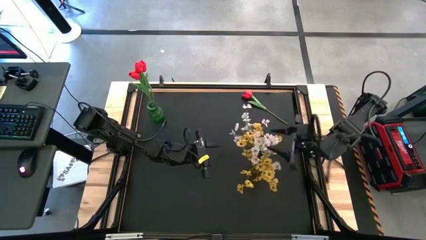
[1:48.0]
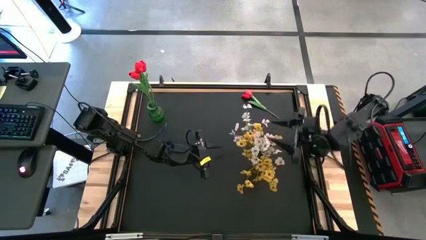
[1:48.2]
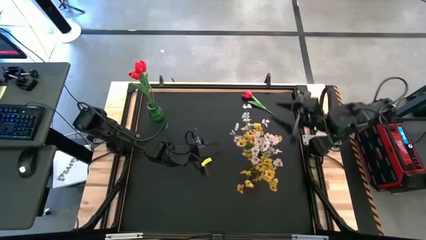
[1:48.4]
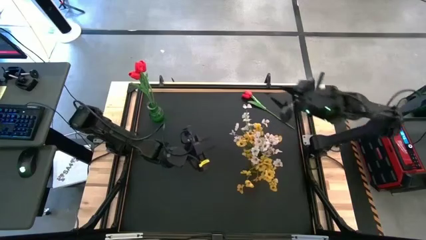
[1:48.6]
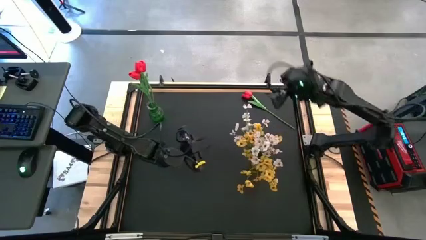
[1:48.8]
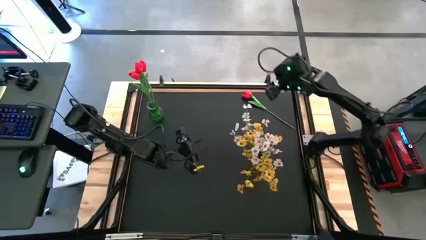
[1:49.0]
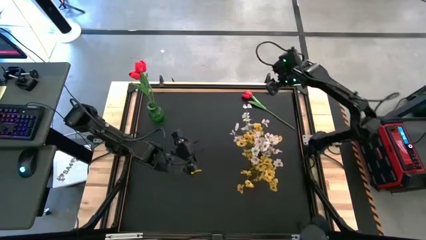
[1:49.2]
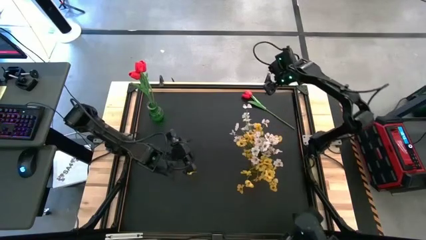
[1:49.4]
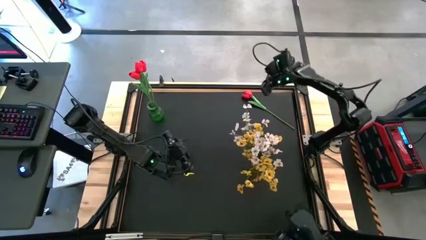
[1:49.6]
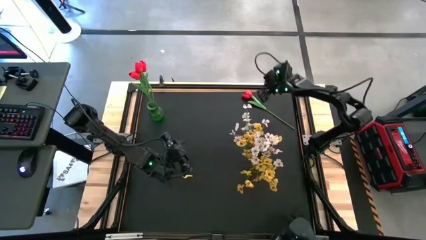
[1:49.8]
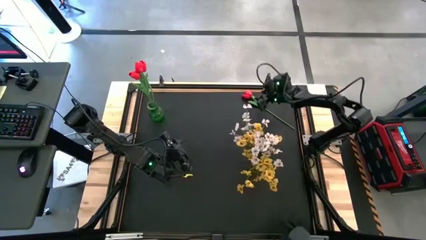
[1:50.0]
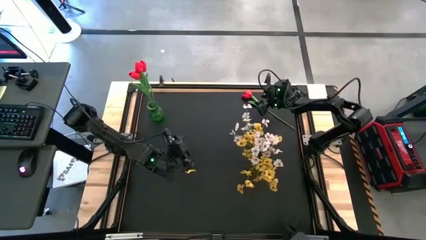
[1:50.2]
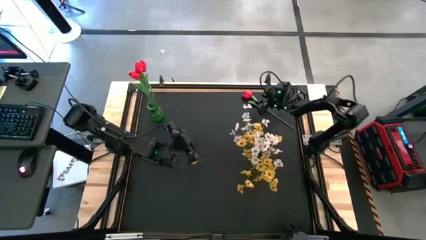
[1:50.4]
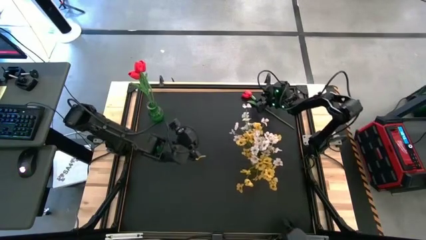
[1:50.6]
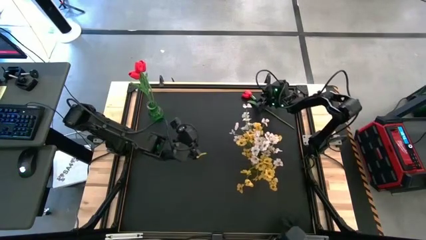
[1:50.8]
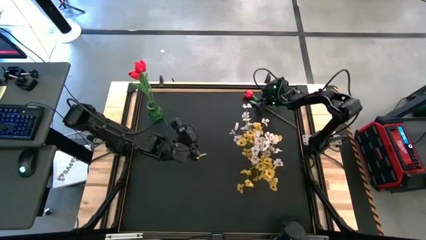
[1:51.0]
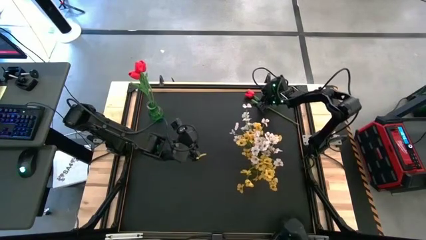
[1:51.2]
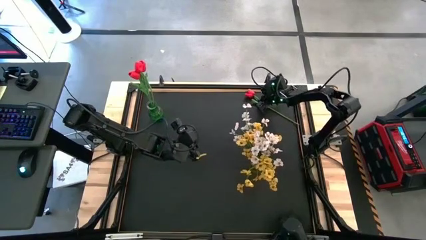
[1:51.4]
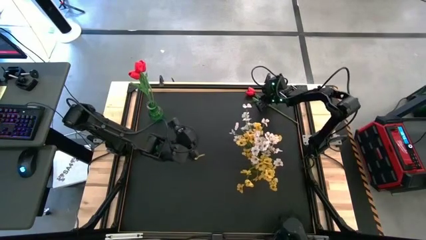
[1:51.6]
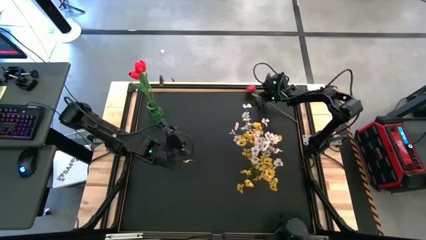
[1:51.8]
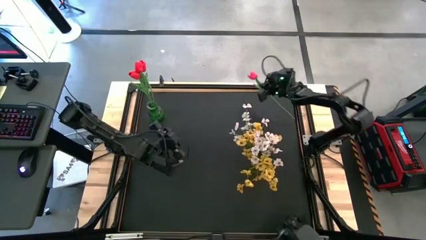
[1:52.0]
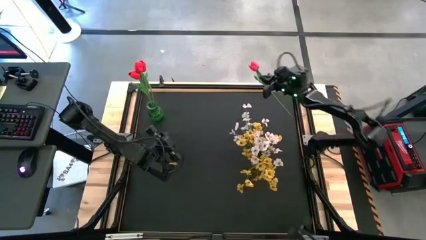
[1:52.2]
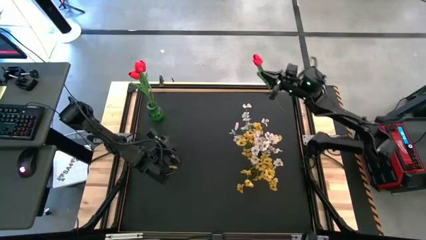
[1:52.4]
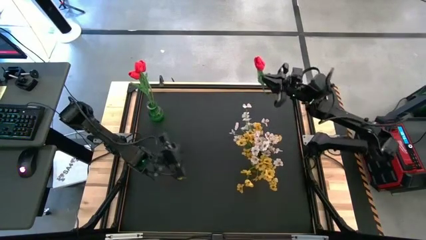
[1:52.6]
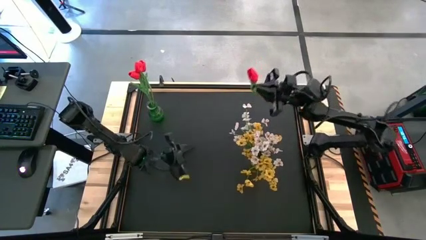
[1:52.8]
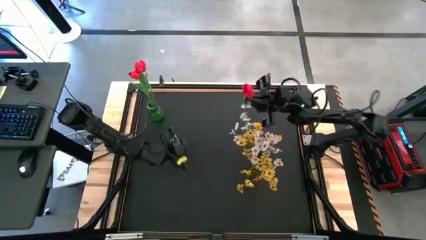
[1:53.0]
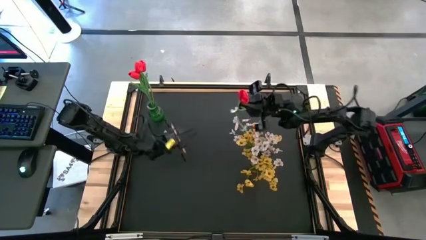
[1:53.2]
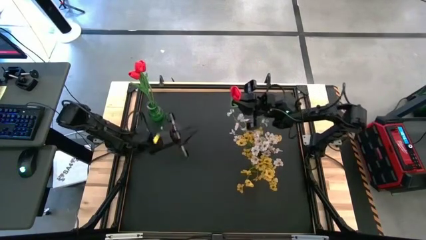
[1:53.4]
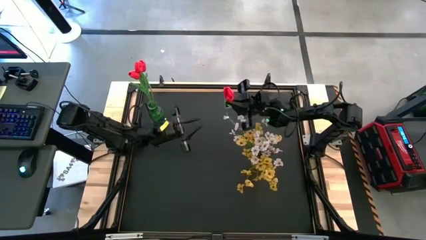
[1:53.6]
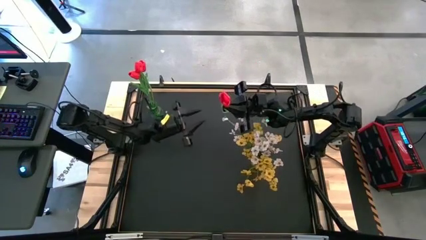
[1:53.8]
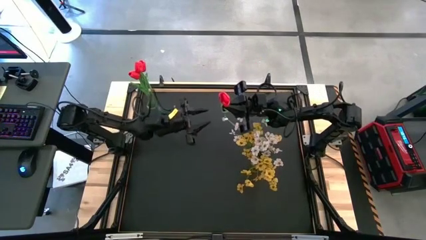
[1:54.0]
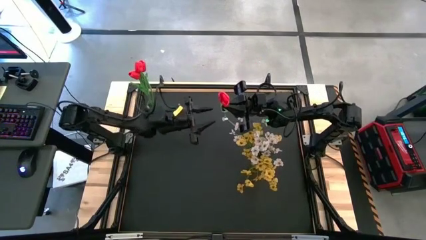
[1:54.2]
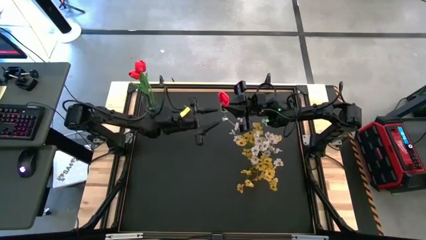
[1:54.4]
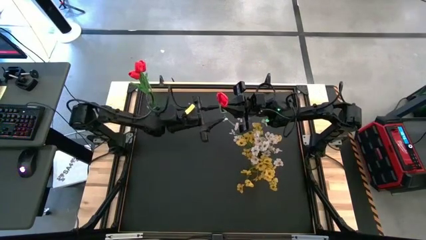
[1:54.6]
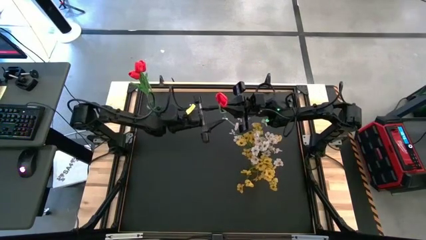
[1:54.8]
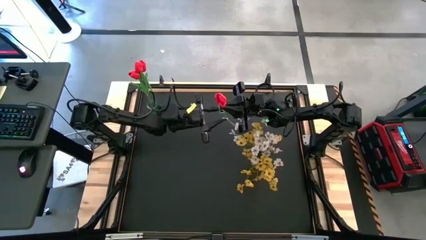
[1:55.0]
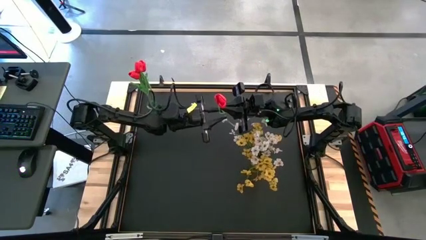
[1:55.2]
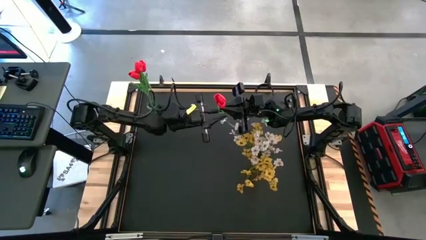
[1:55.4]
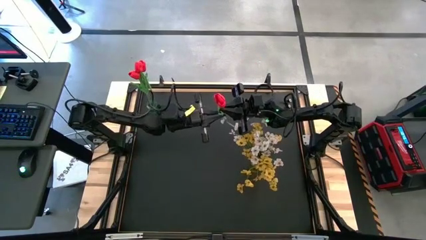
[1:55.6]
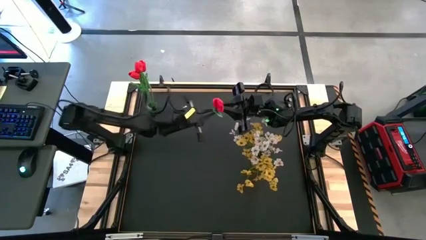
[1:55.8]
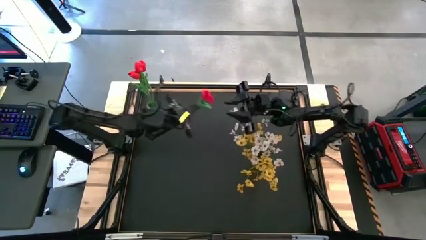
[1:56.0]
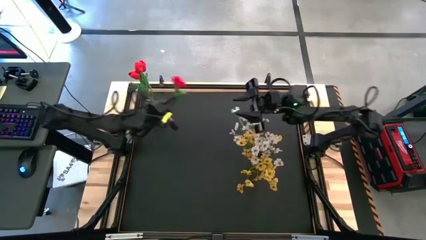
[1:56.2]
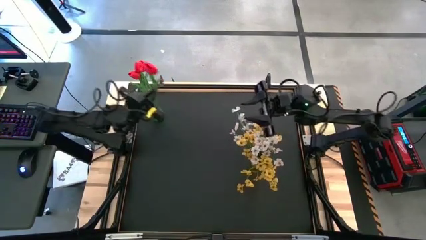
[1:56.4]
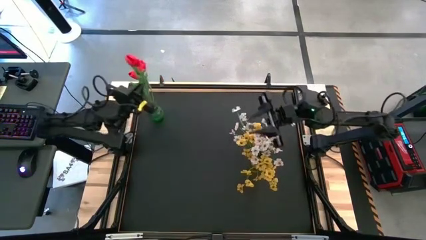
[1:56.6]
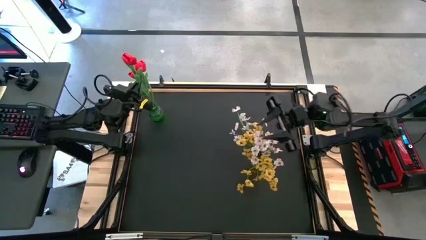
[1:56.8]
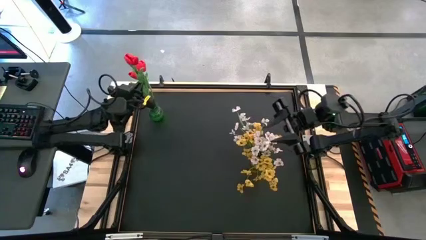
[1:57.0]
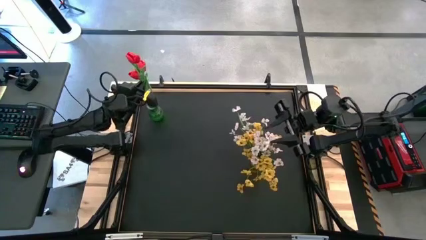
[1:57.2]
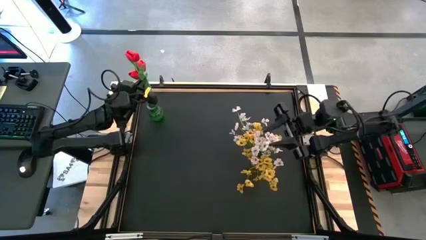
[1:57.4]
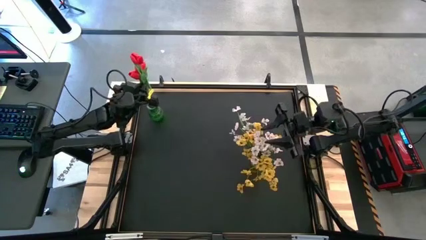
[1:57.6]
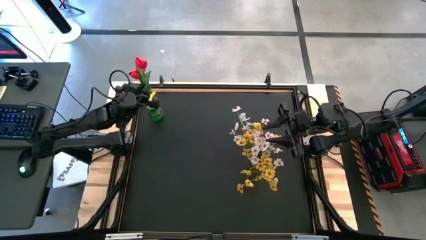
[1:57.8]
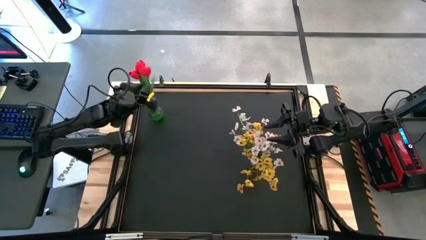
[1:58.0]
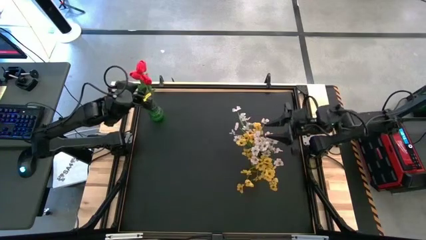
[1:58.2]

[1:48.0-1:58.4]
Task: Sort flowers into vase by color
Put the red flower into the green vase

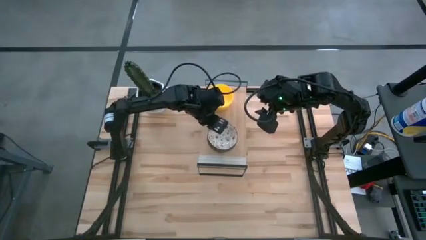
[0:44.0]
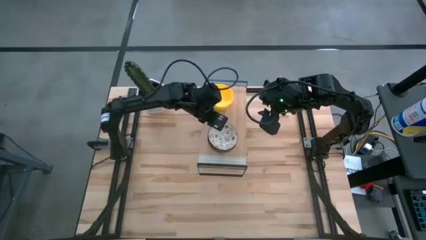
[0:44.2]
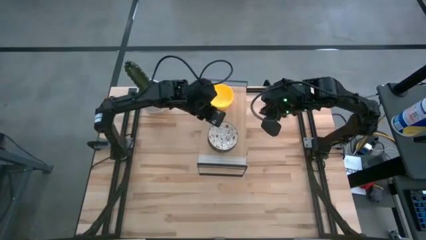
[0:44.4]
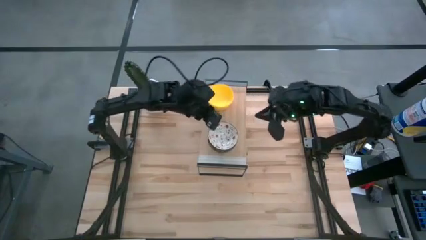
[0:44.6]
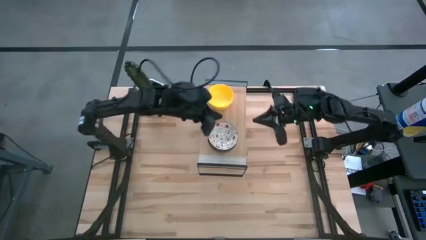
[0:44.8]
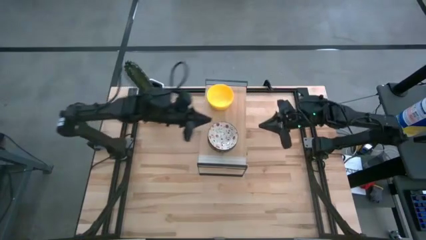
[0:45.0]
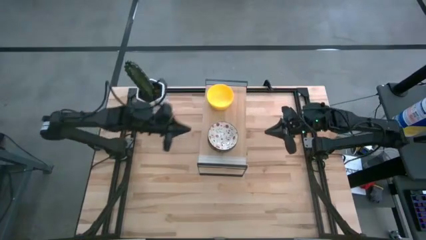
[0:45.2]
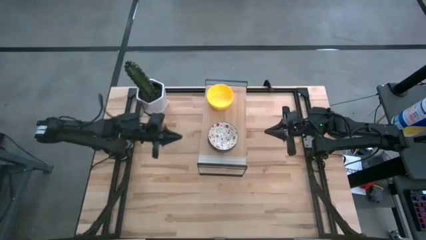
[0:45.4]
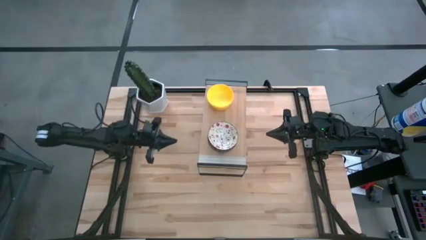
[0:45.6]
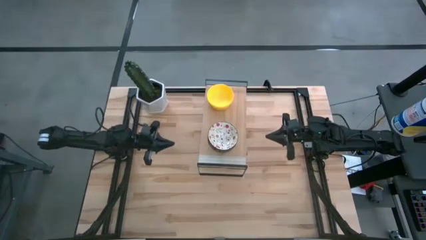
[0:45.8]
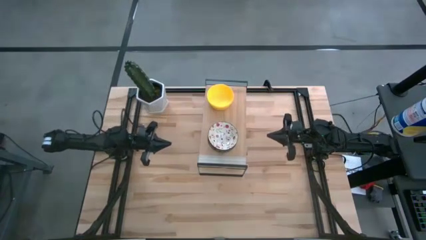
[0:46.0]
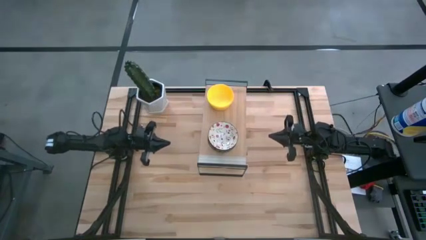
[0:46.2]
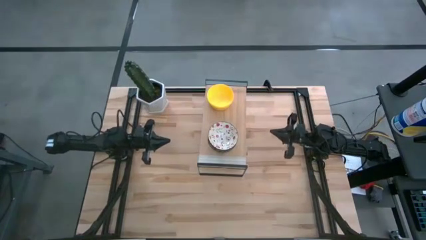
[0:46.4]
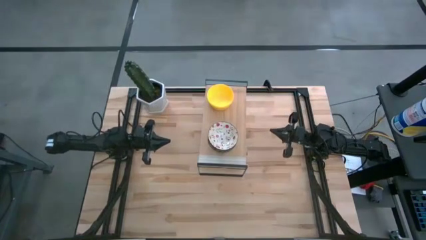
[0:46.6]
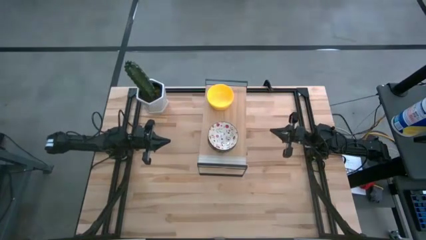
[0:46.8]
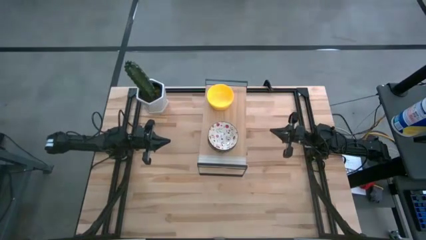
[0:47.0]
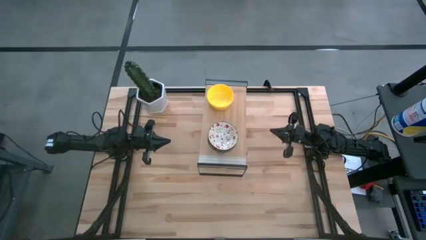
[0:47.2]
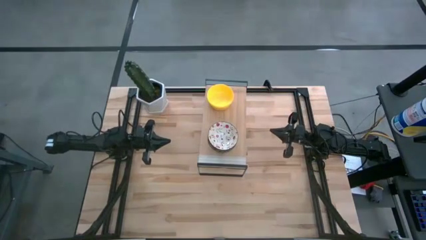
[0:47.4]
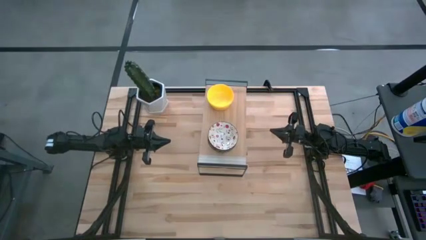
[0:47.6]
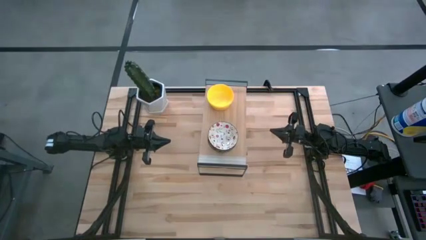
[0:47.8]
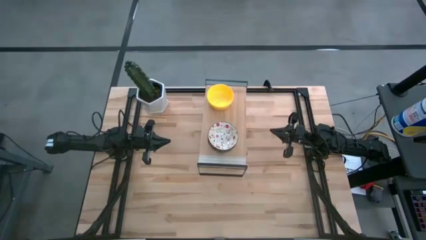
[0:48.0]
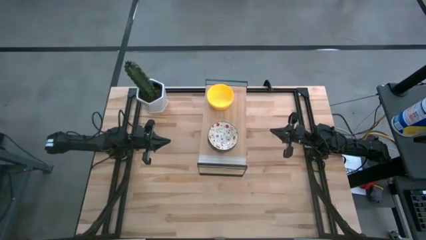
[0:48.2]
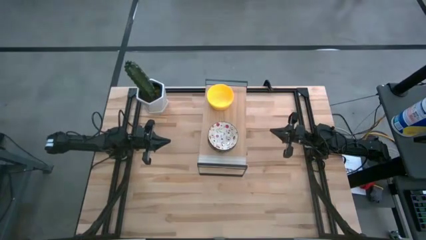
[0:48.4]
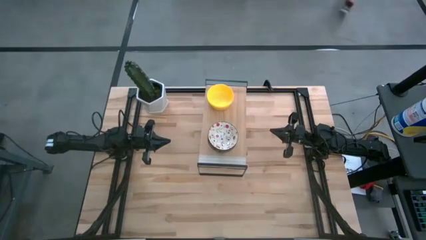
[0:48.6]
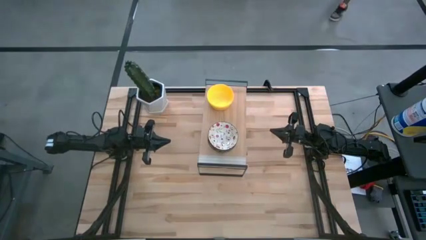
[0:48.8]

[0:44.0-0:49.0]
Task: Pick & Place Mini bowls
Return to Home Position
